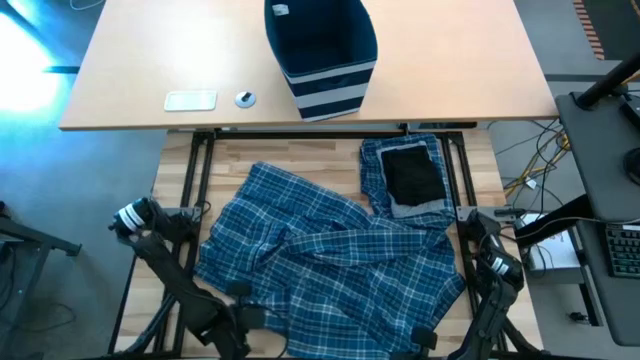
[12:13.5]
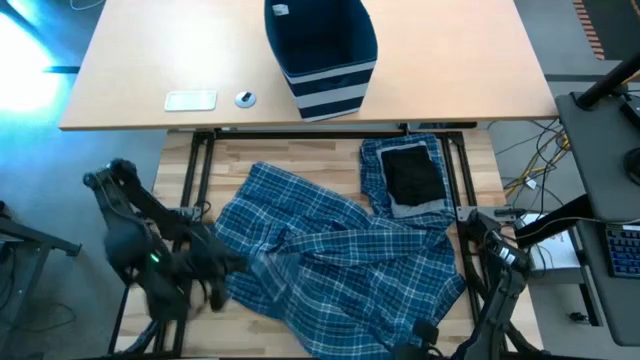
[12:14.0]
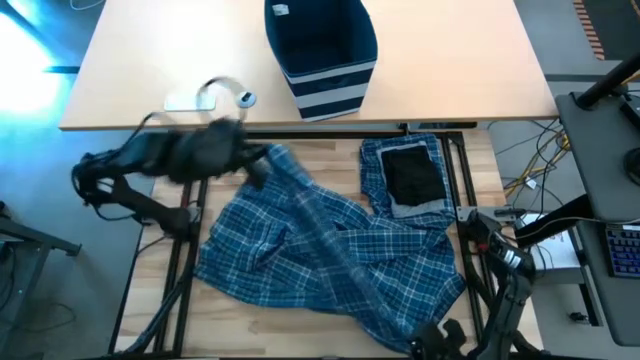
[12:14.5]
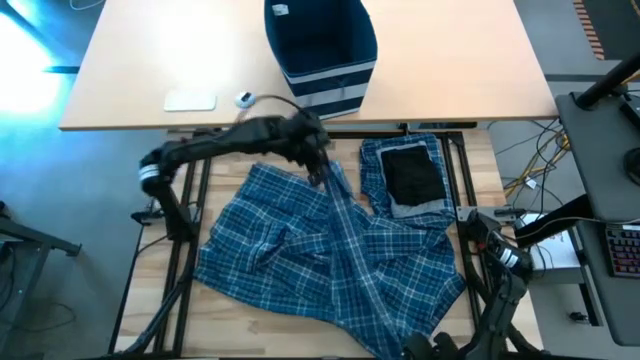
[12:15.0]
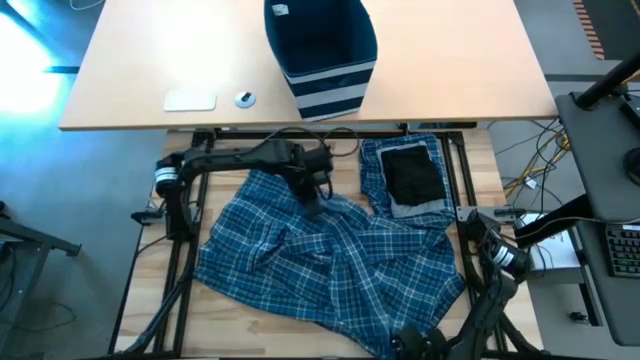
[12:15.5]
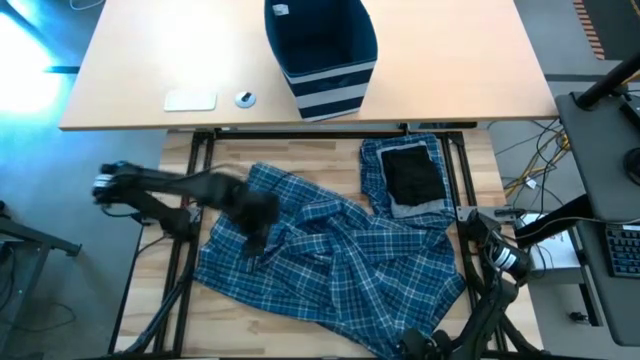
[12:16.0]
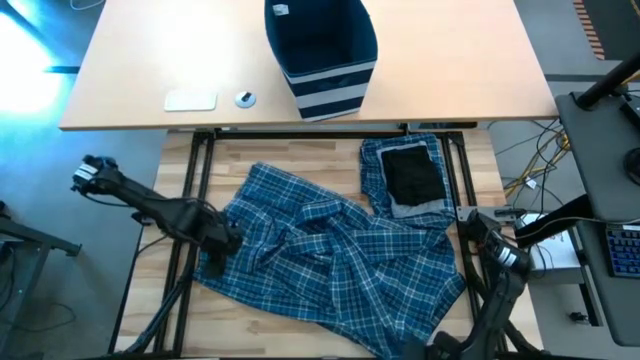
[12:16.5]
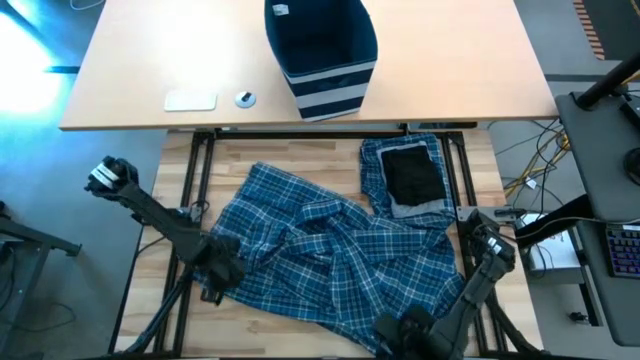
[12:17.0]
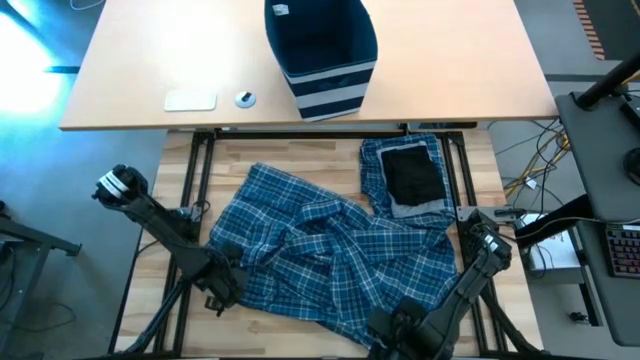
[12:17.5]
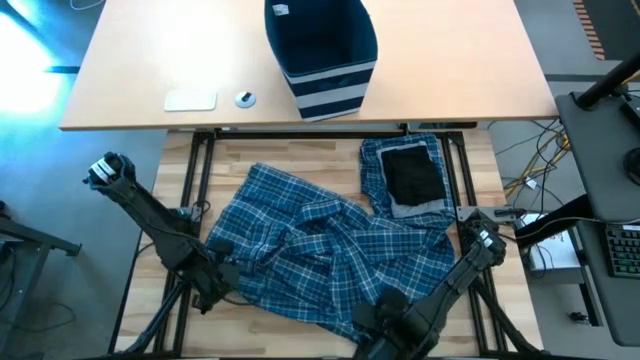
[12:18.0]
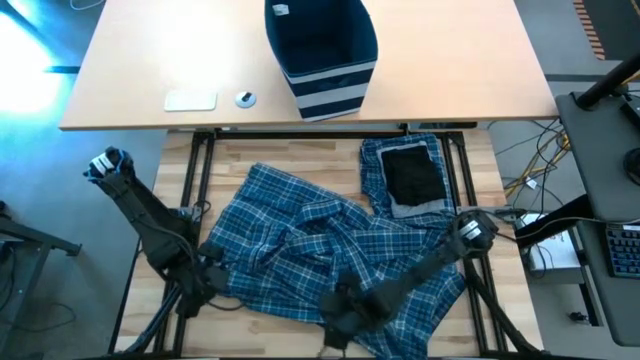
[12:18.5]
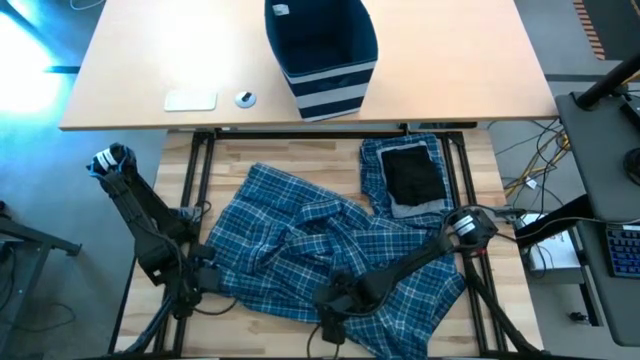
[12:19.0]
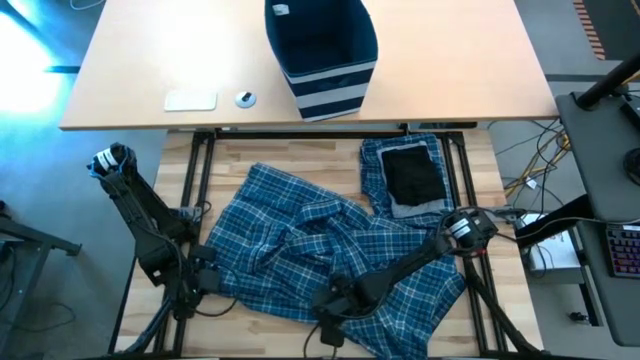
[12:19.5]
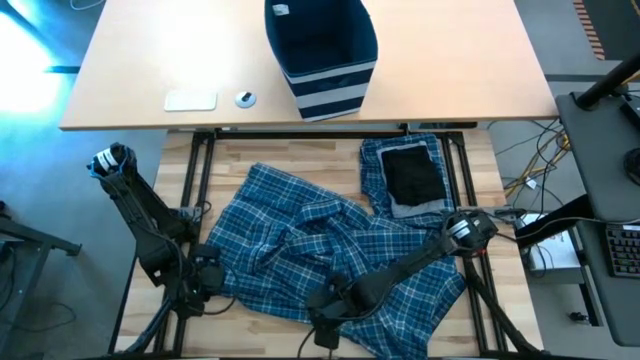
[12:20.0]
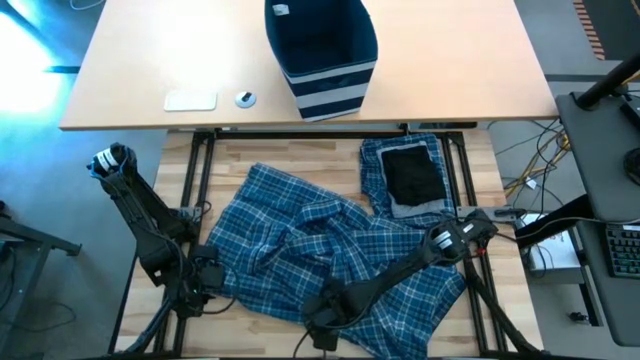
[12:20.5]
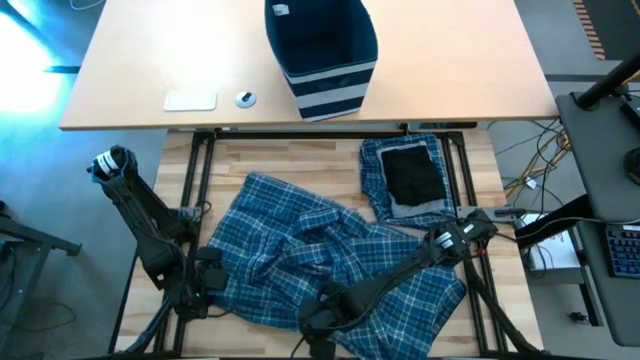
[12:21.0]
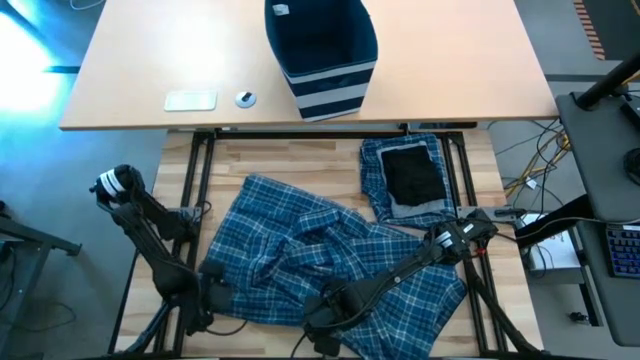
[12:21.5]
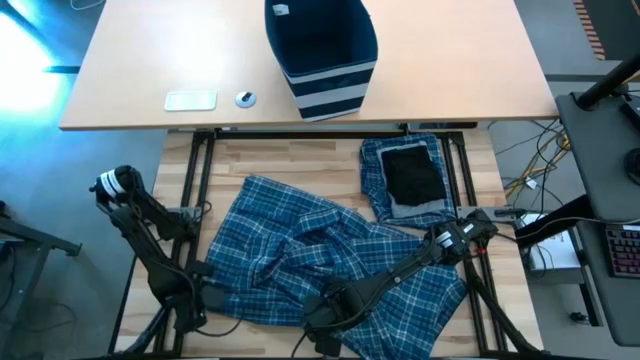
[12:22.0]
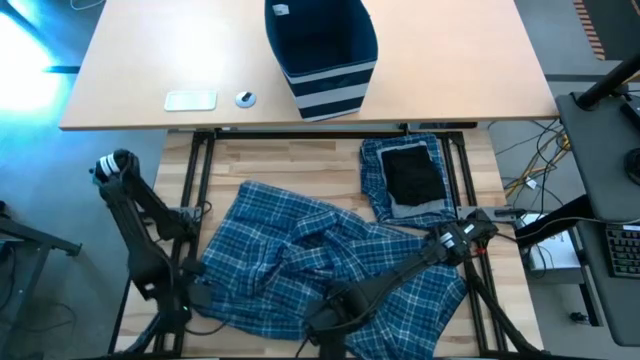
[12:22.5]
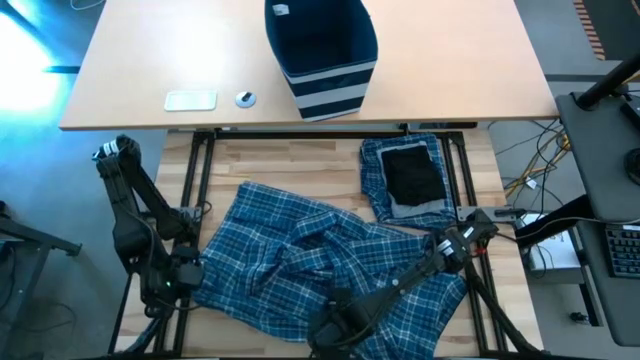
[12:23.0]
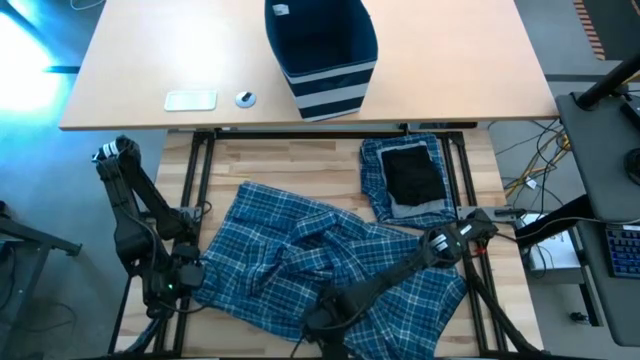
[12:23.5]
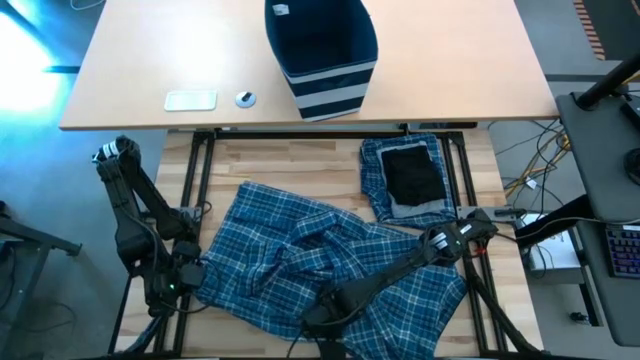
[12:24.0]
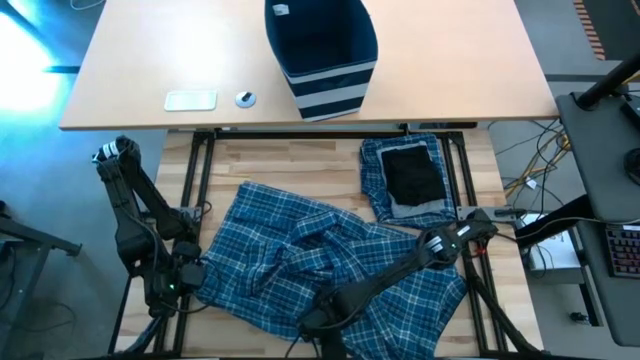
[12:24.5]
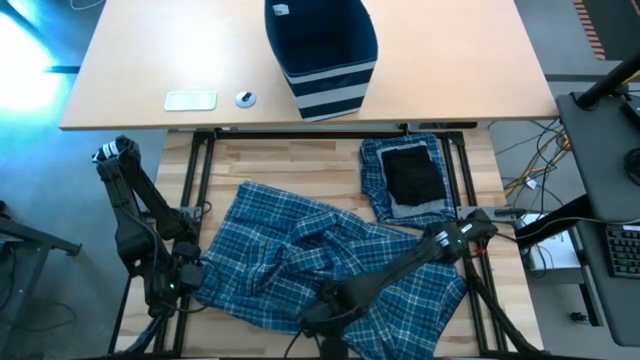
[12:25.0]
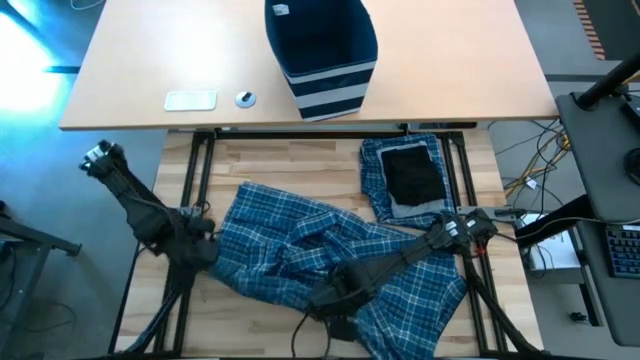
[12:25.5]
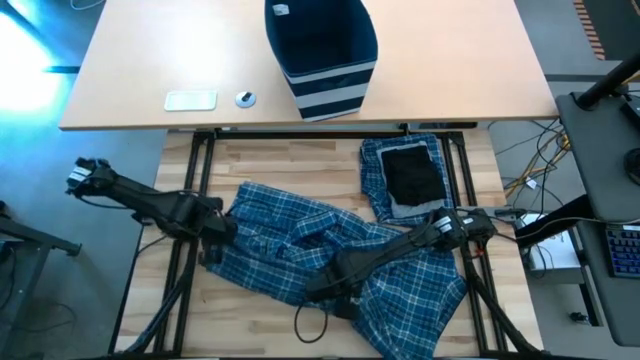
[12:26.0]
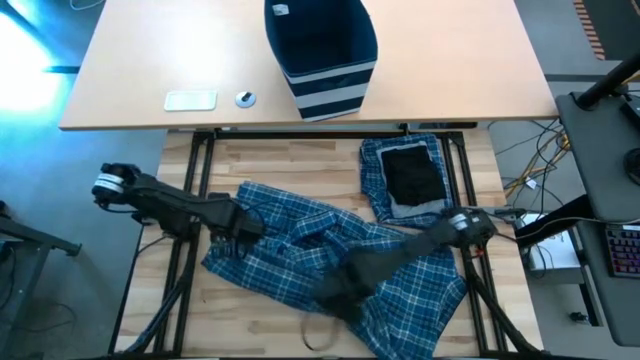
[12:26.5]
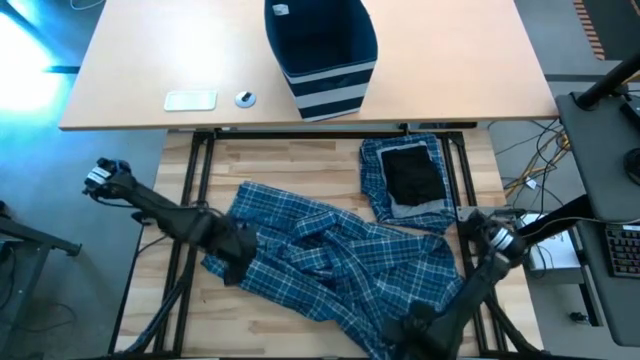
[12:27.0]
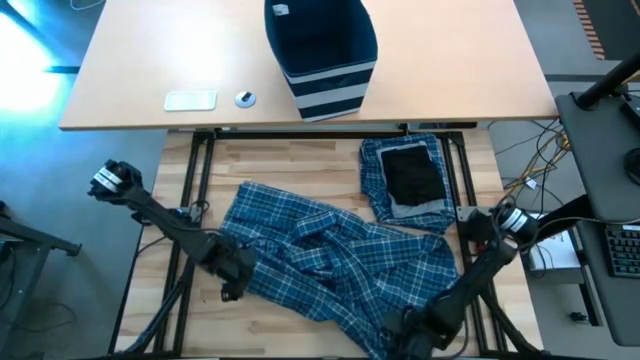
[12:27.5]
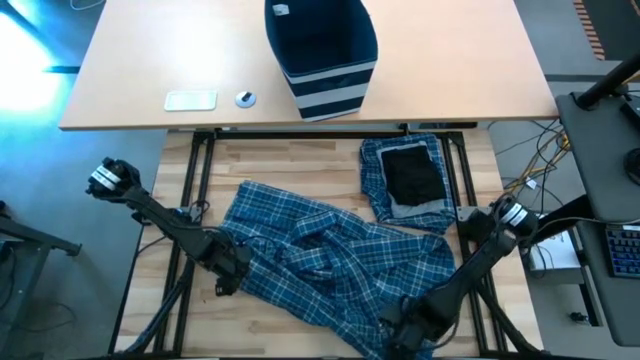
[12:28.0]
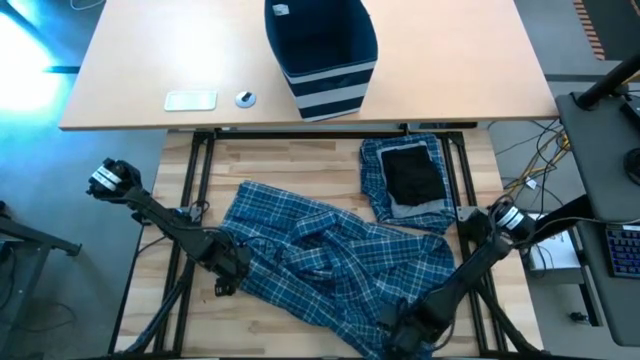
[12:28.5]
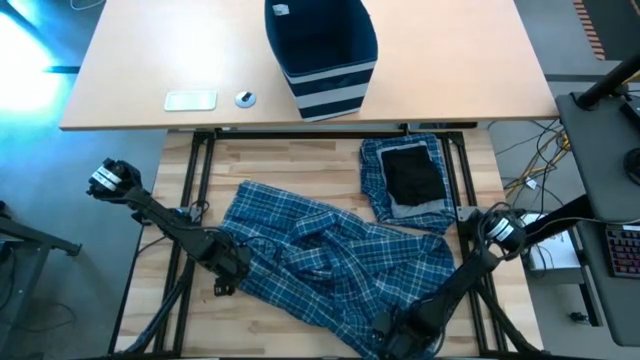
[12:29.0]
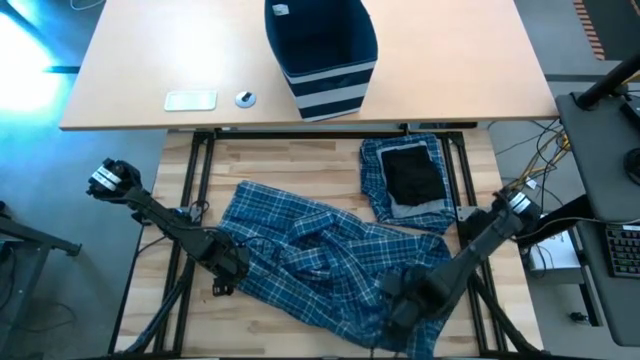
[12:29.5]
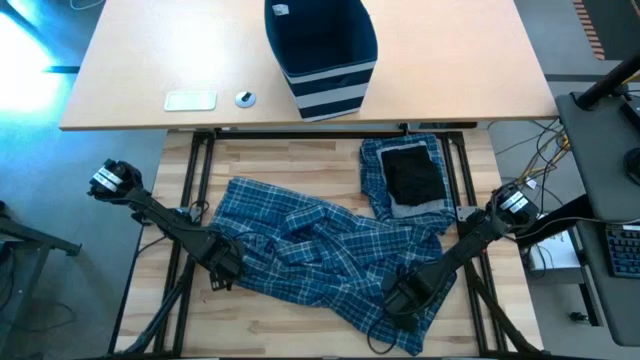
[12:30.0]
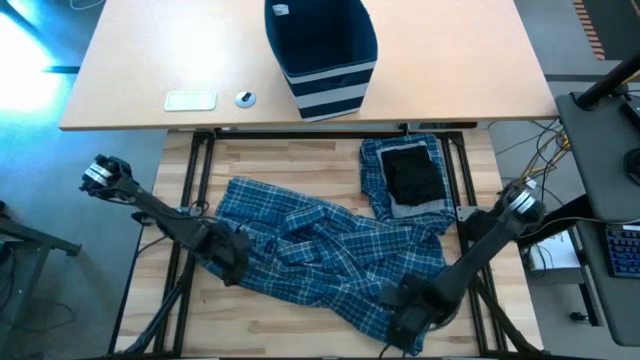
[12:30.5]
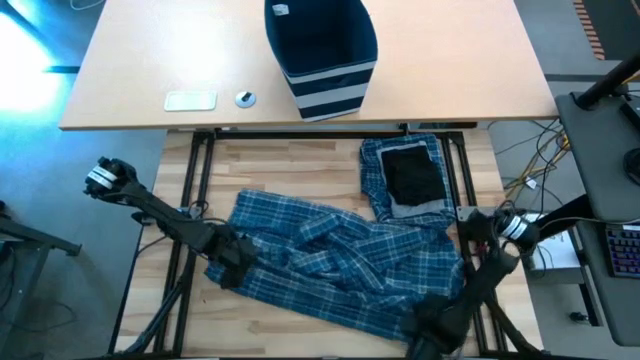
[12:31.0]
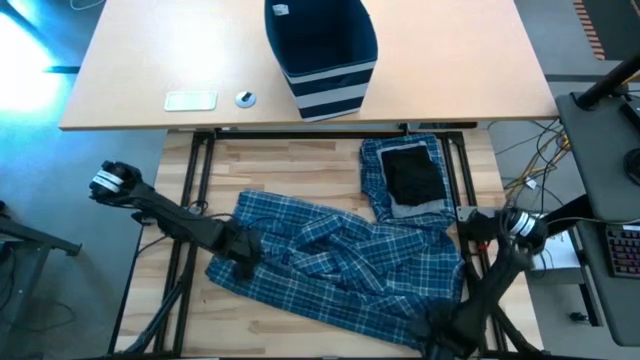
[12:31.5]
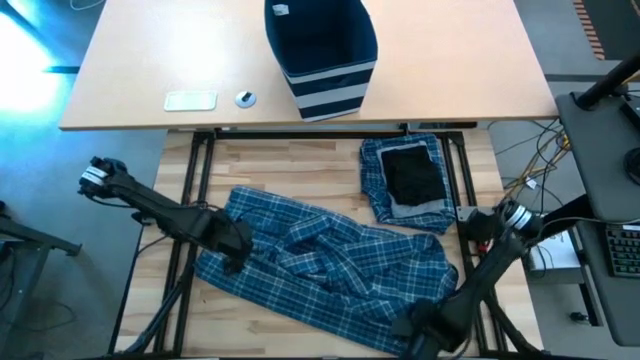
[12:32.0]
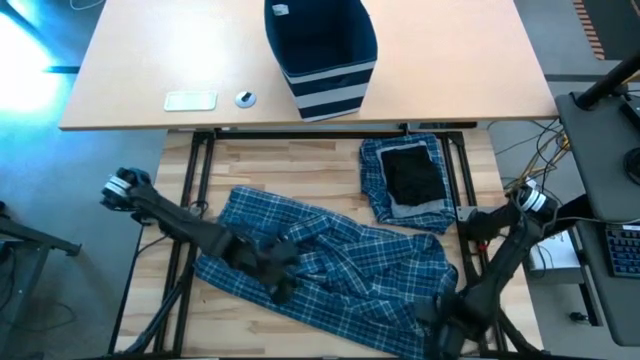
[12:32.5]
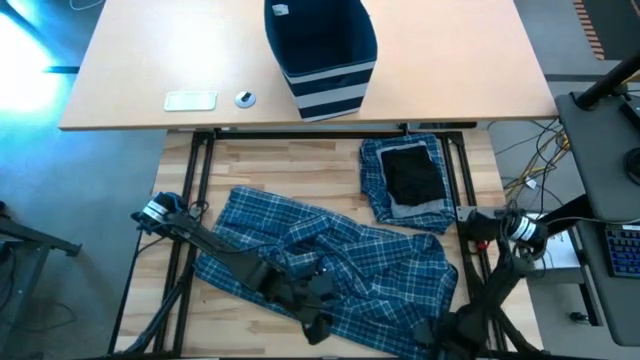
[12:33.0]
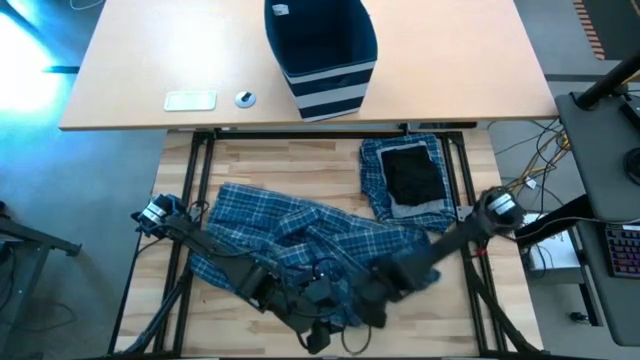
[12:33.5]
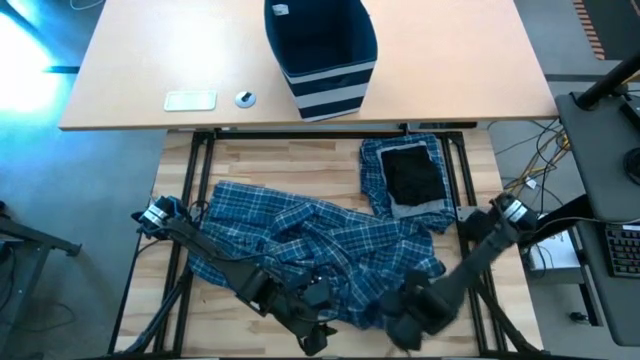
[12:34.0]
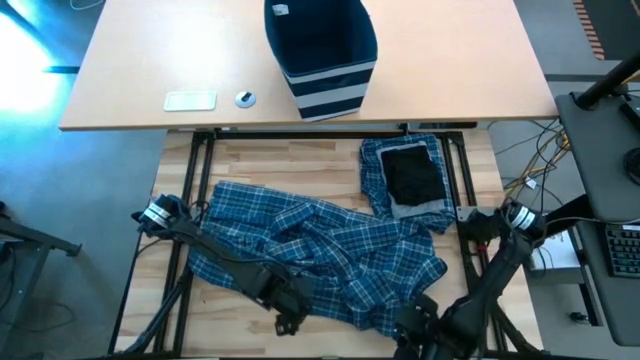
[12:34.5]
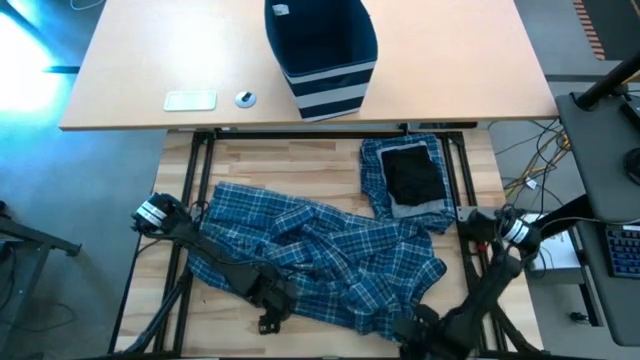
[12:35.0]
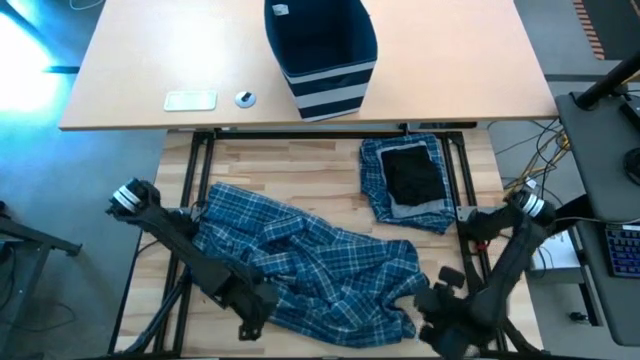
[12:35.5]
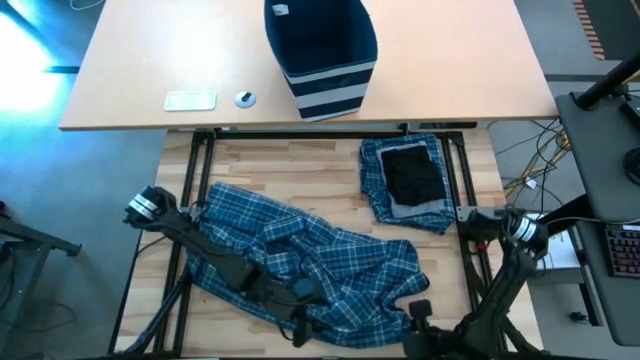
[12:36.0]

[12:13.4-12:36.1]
Task: Fold Laundry from Bin
Fold the blue patterned long sleeve
